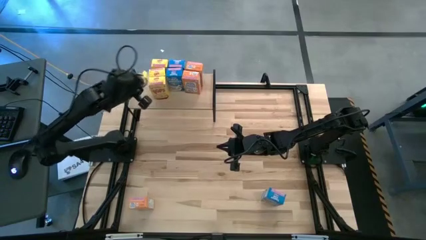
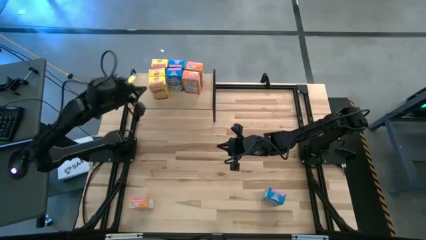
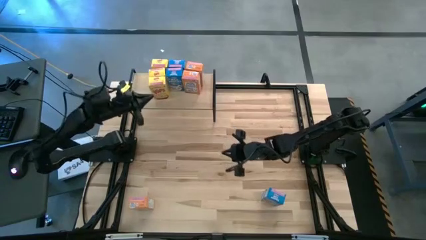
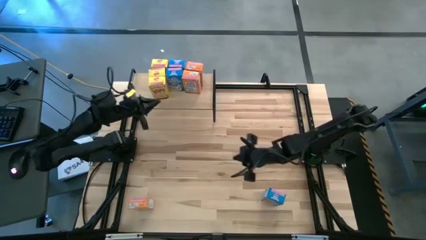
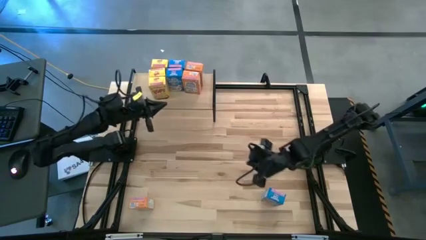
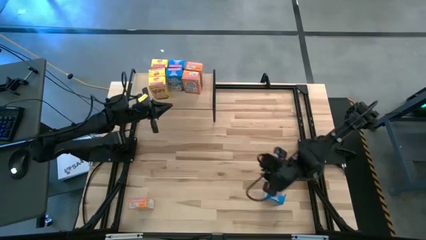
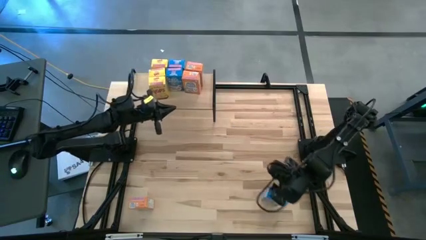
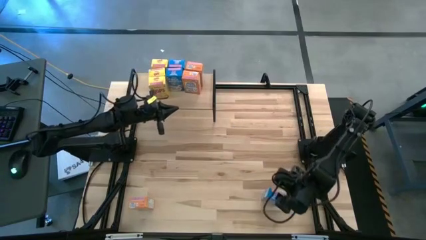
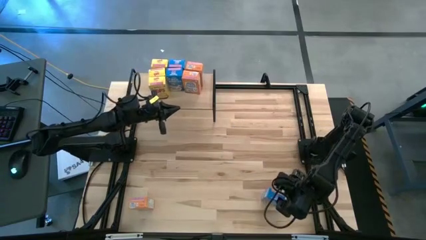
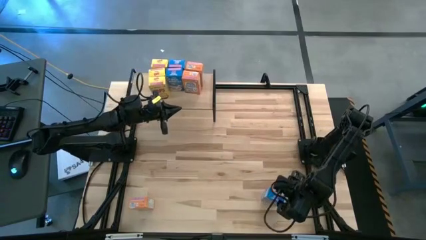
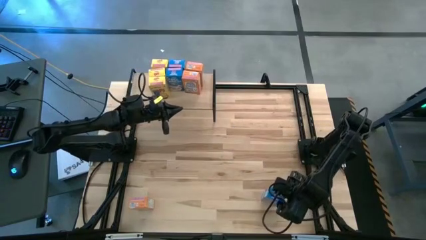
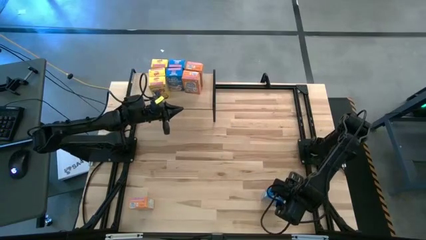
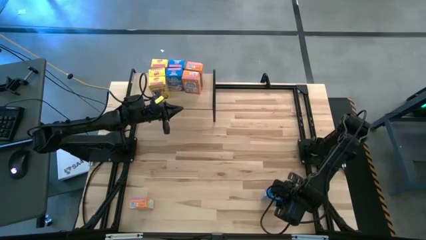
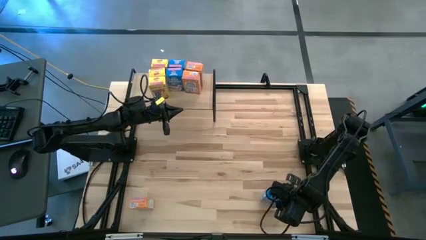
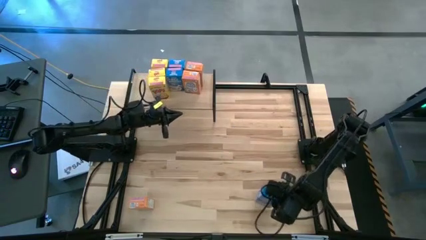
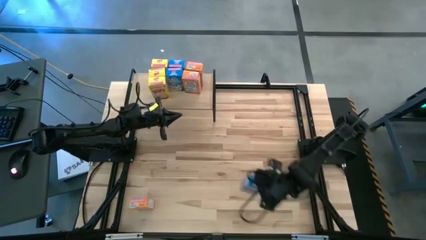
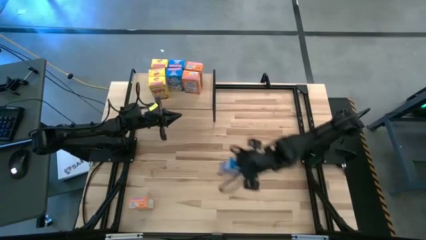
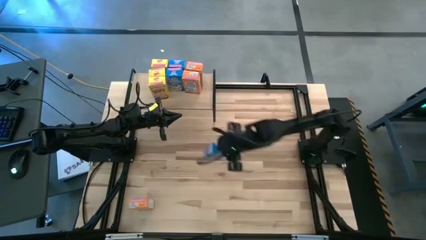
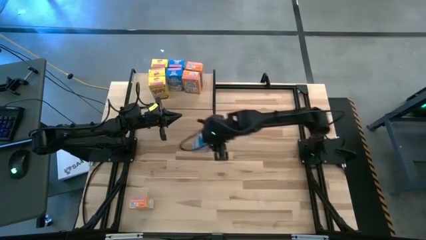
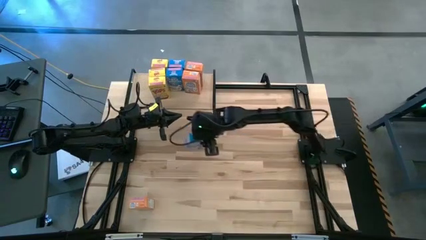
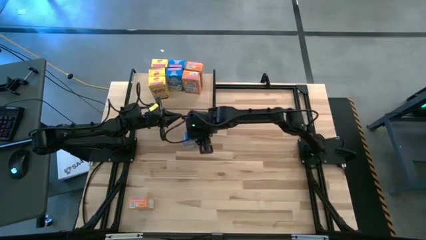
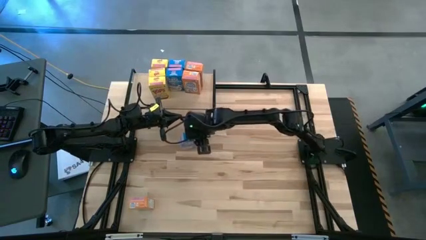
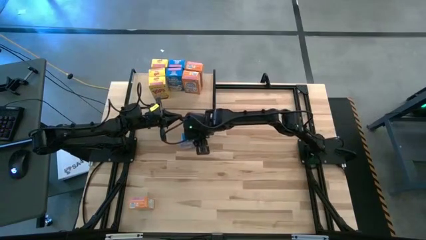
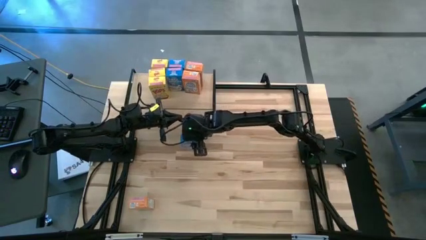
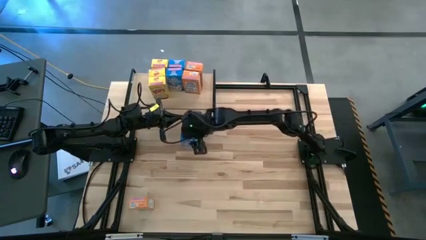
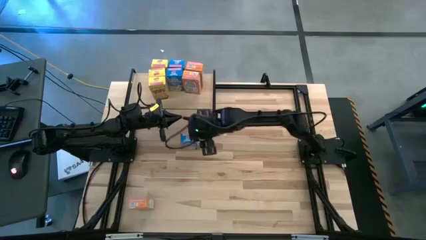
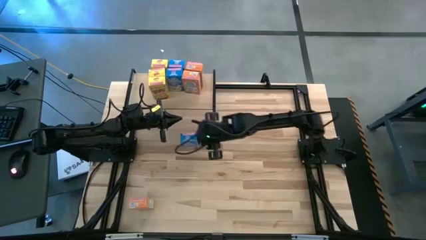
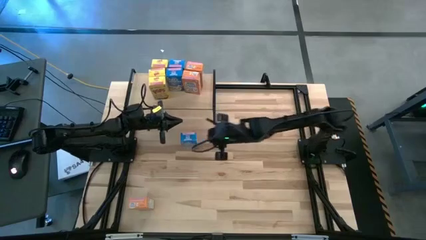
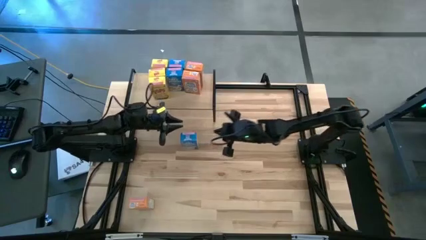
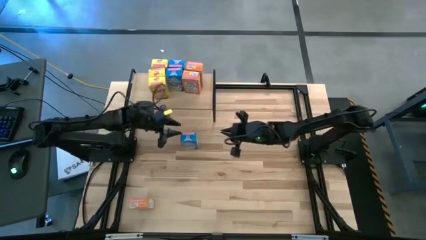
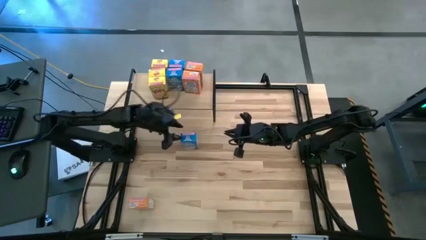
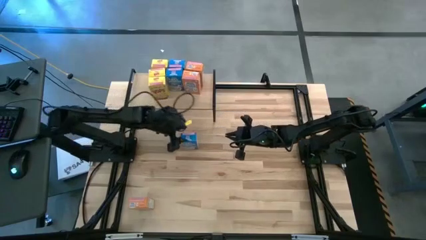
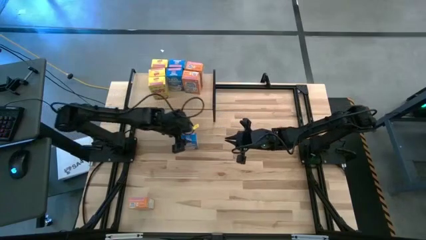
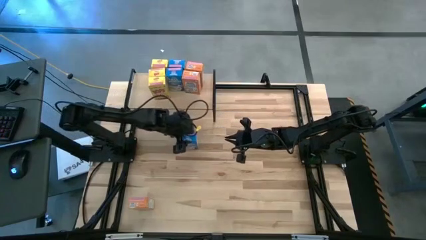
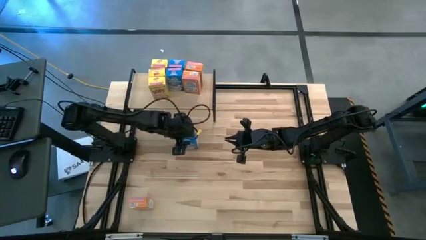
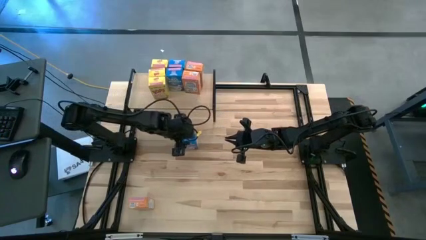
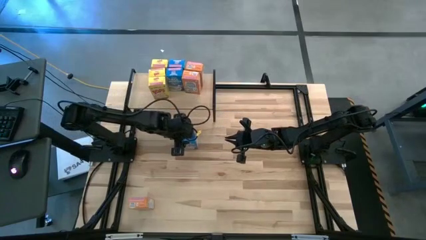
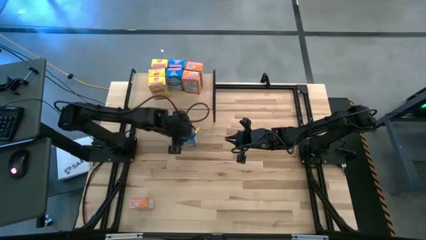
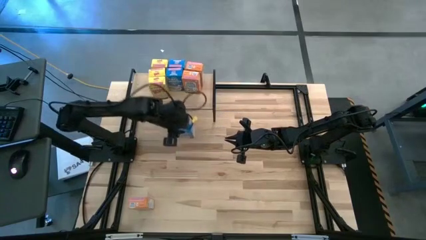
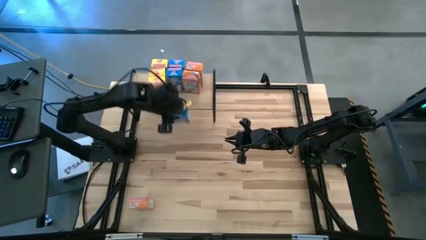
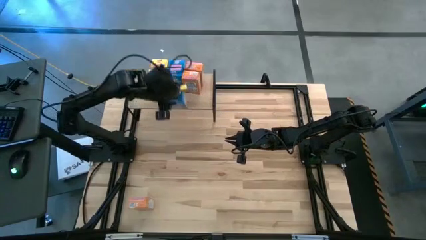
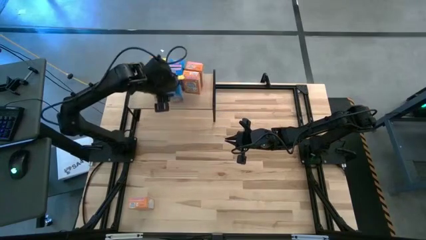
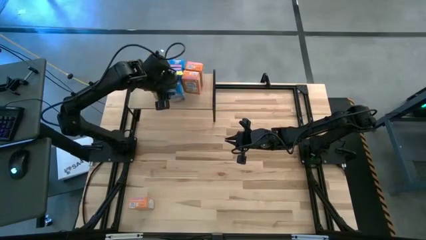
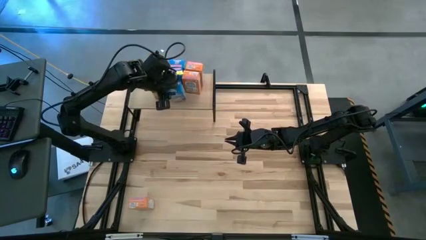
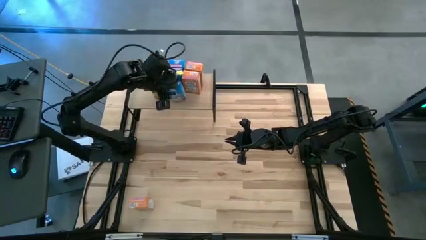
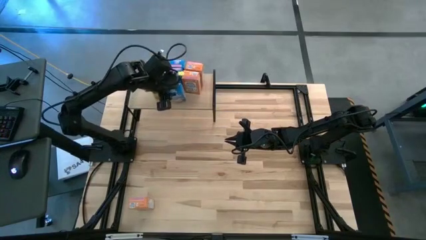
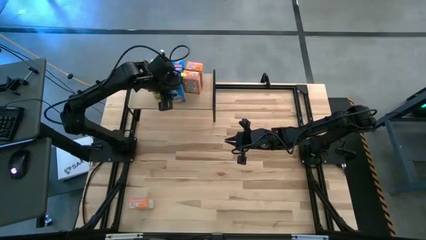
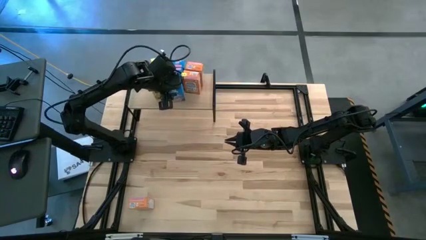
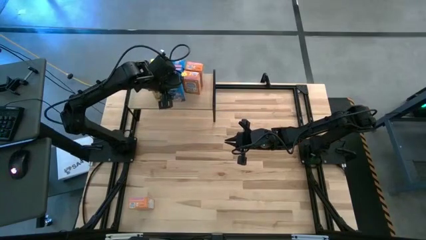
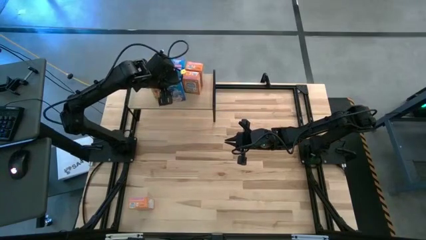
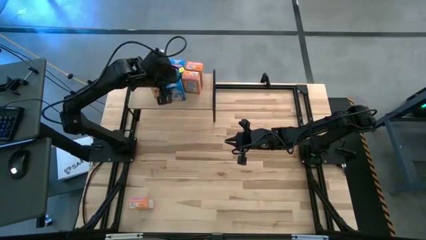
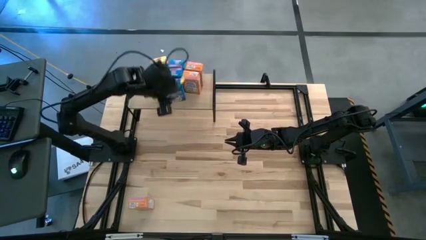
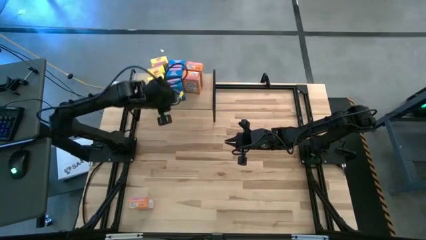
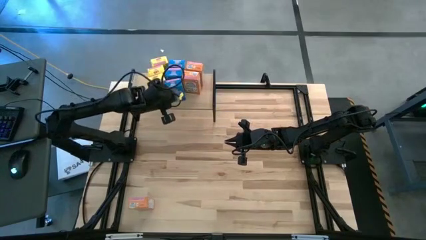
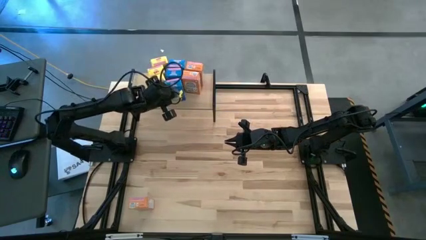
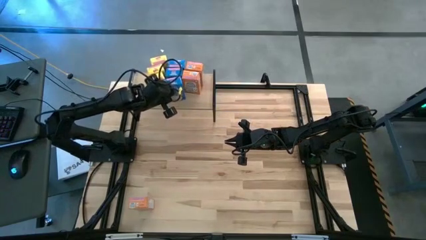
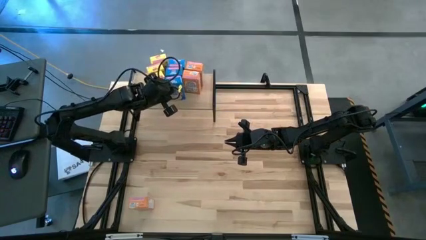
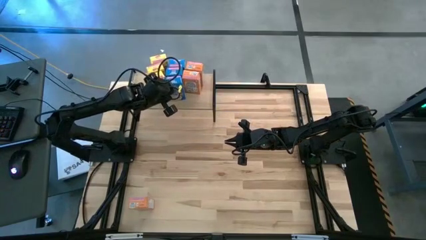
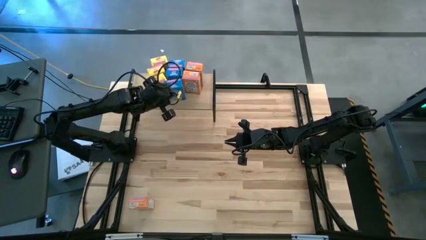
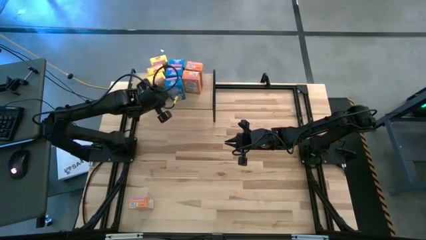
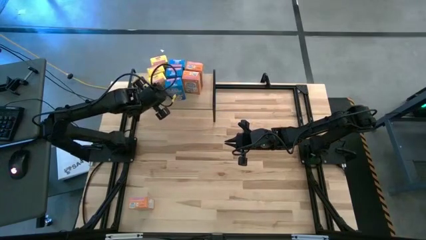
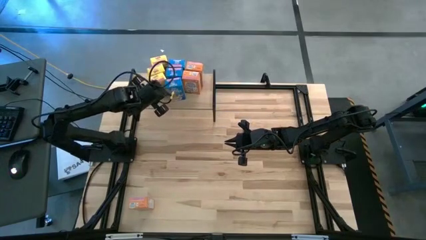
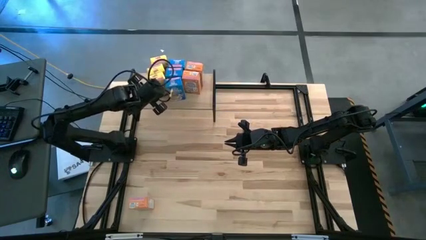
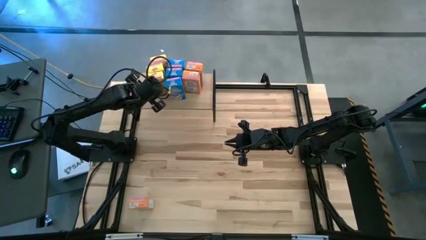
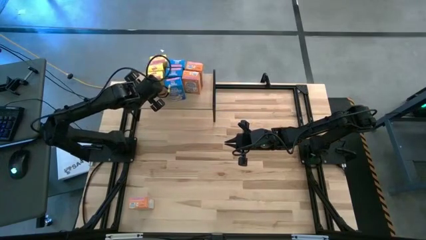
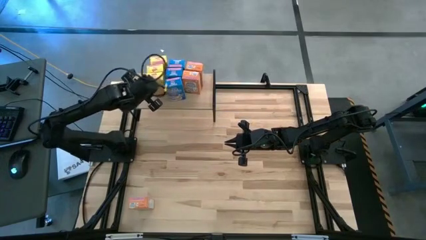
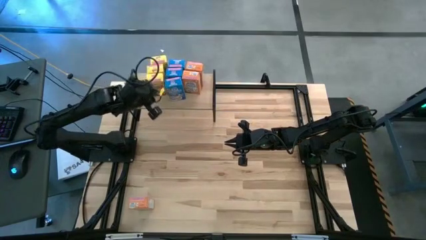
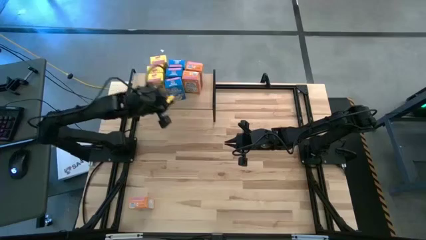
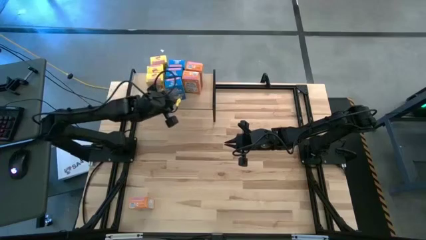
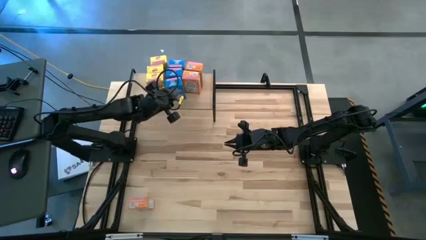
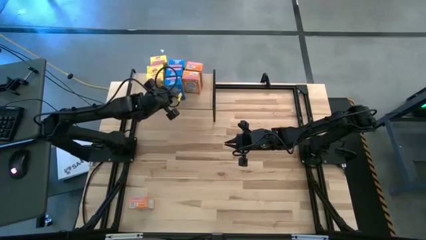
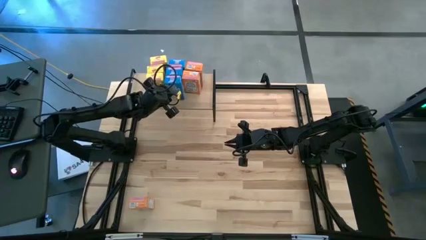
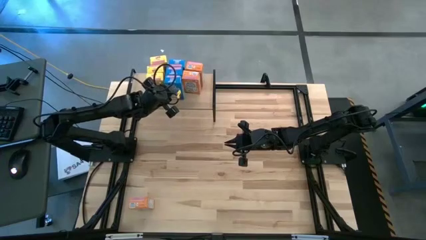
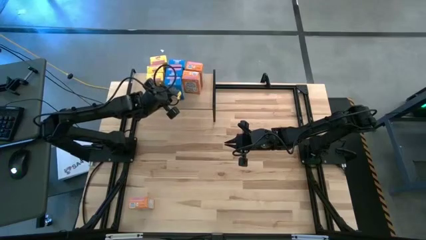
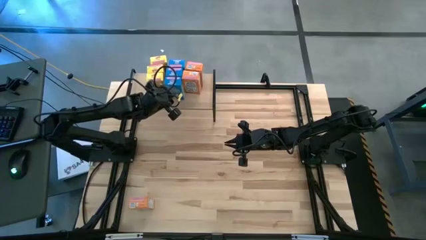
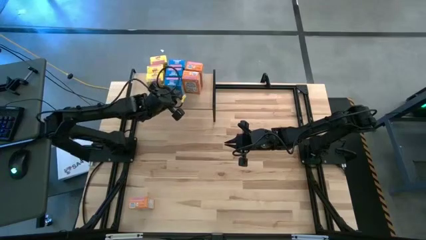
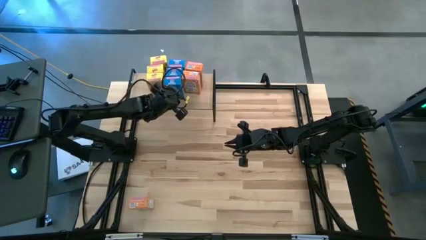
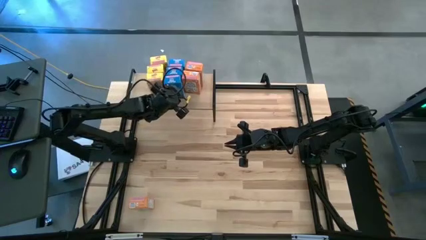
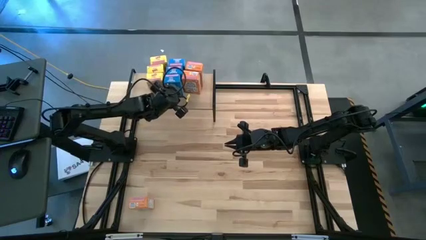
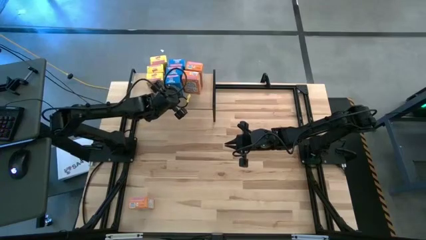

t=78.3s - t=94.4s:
Task: Stack cereal on shelf
Put the blue cereal box on the shelf aligned with the other blue cereal boxes

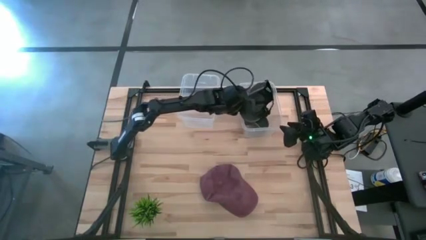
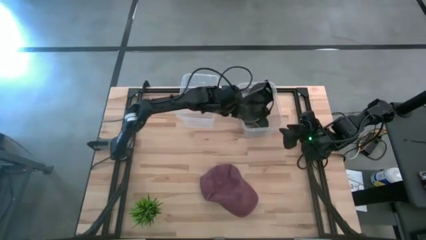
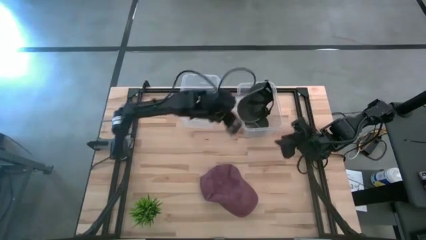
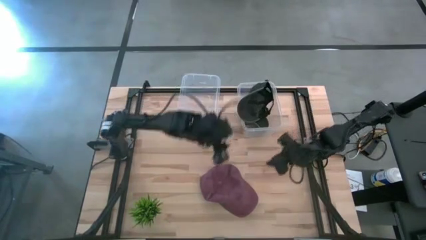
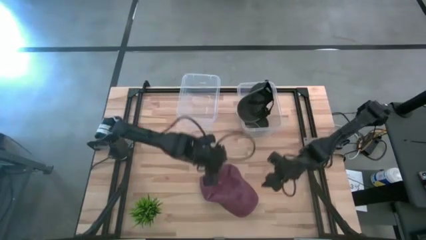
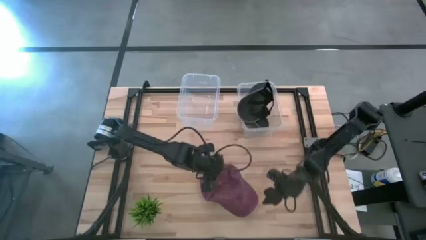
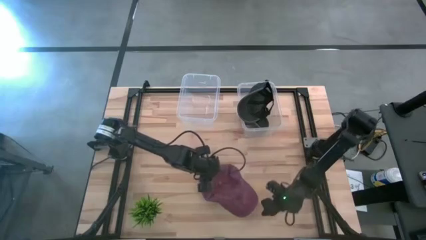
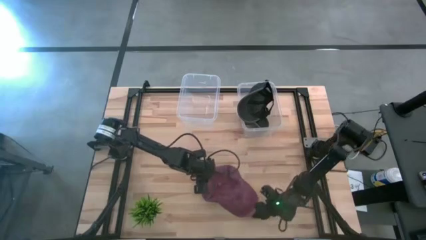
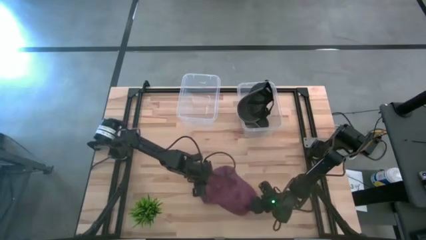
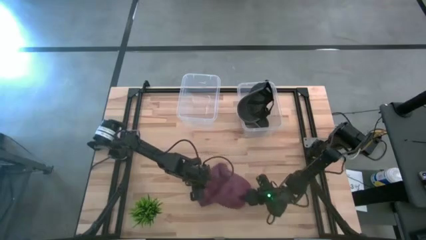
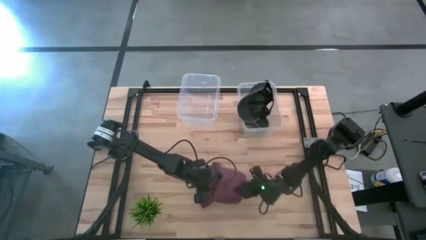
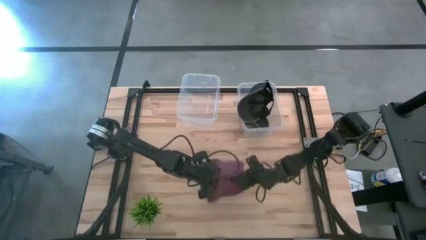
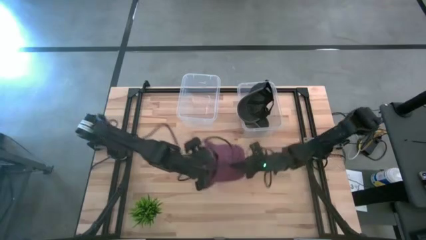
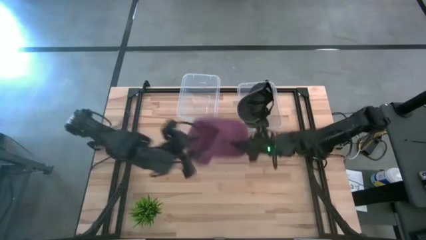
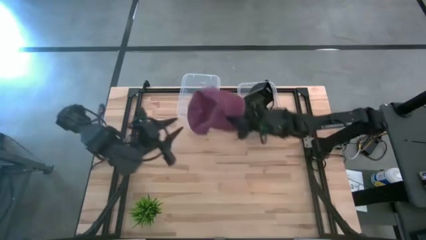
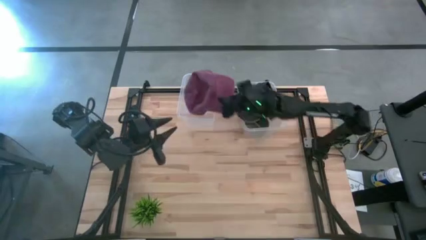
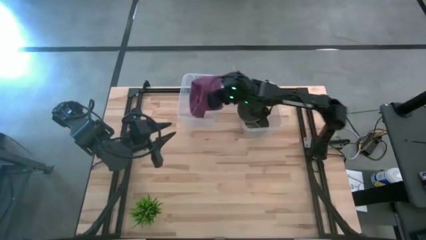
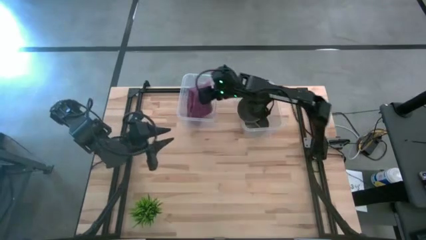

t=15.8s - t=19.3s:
Task: Pick & Place hat
Put the dark red cap into the left transparent bin
